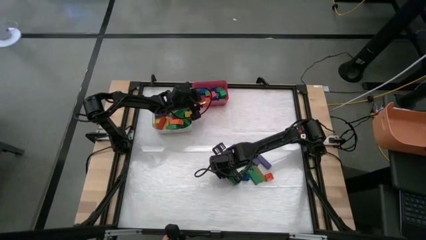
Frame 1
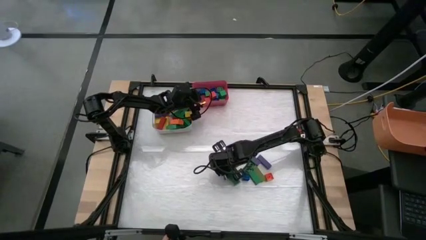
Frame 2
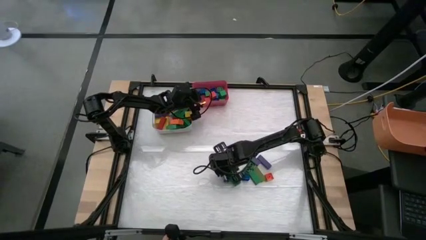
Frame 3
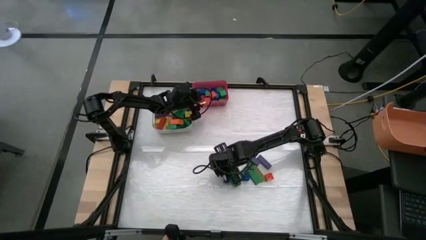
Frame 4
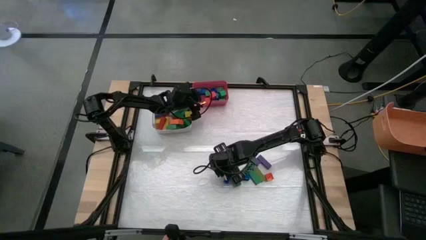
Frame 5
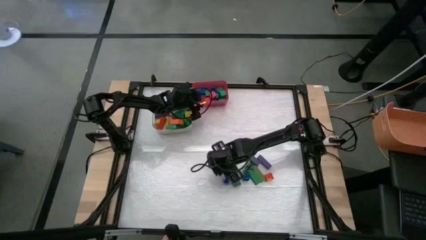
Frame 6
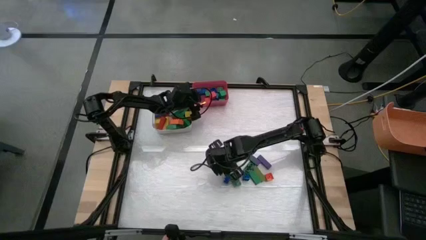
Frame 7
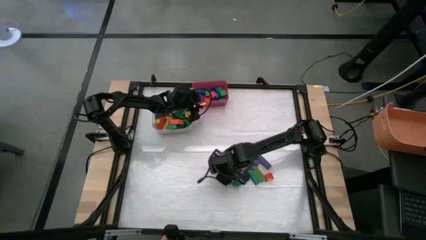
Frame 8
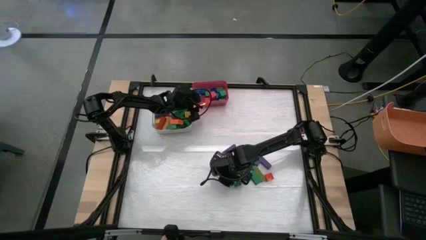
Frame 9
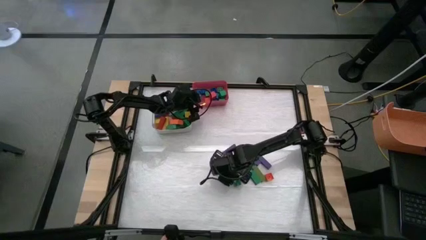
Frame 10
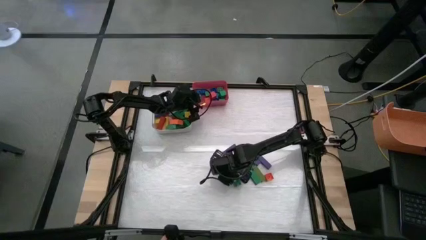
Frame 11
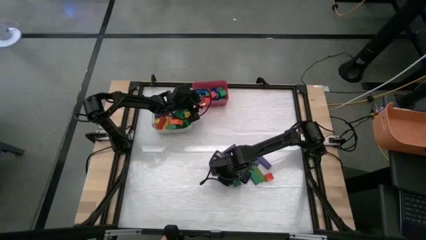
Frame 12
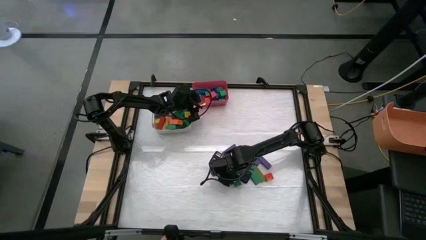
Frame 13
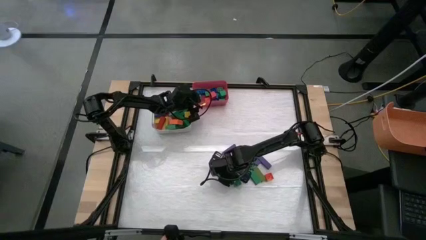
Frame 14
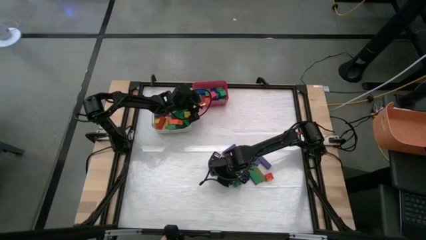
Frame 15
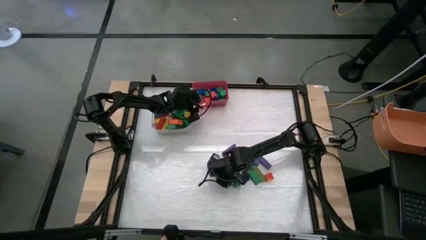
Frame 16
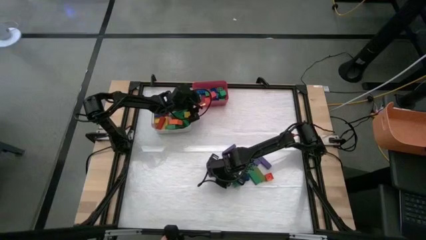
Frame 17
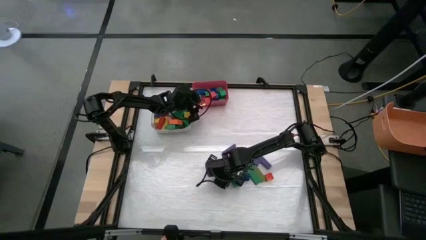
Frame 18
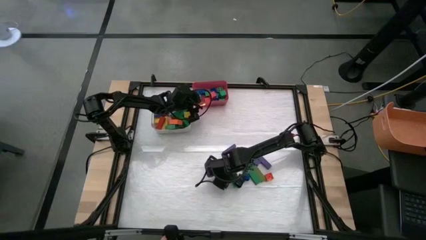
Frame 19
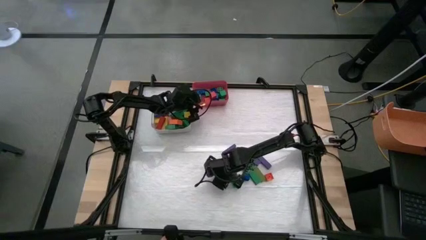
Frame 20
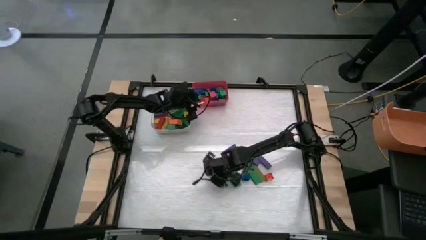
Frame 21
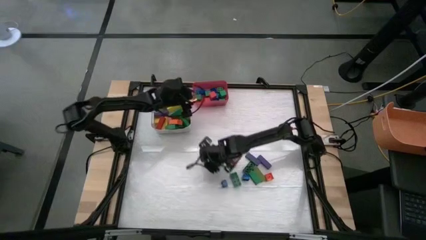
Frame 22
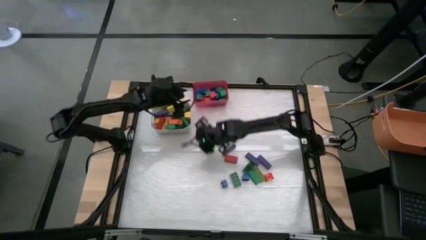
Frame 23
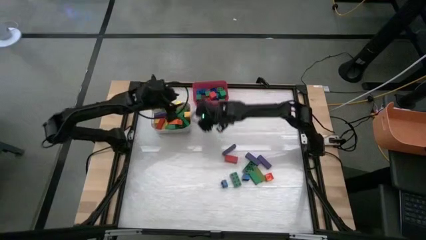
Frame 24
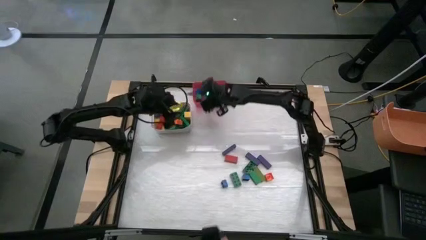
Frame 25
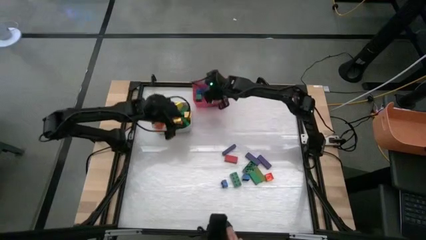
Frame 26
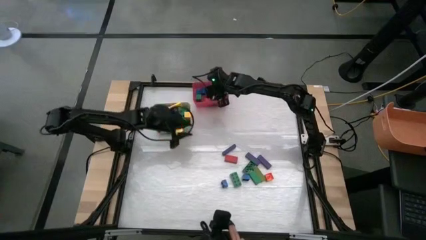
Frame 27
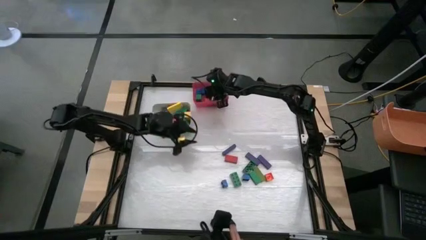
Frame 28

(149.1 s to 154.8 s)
Task: Sort blocks by size
Put the small green game piece into the red bin

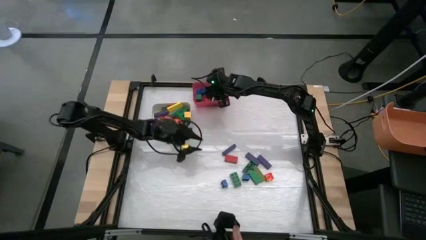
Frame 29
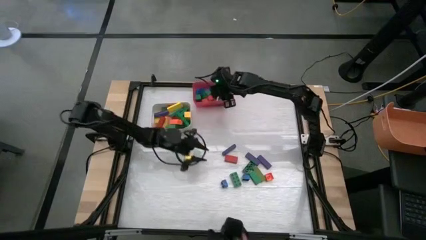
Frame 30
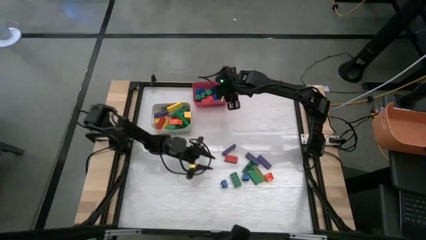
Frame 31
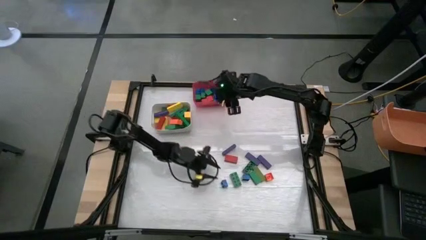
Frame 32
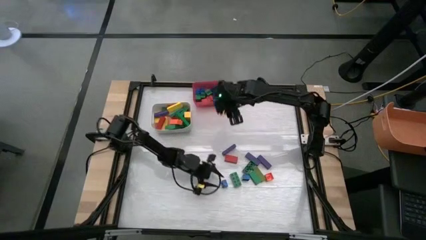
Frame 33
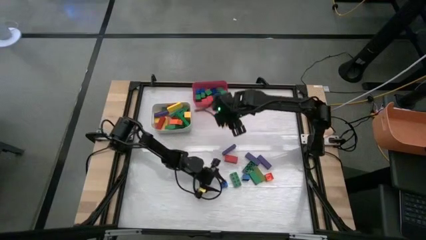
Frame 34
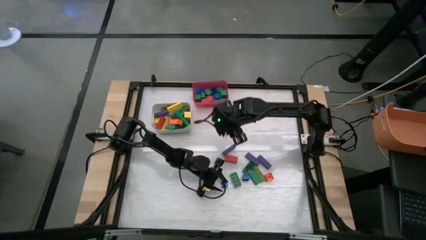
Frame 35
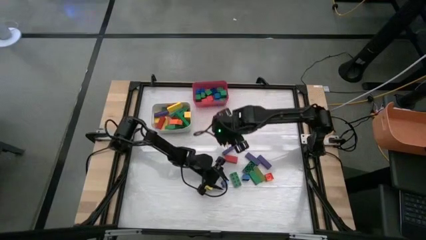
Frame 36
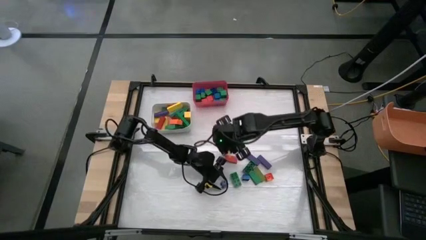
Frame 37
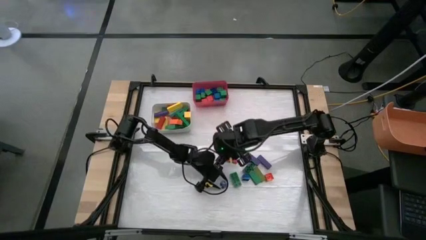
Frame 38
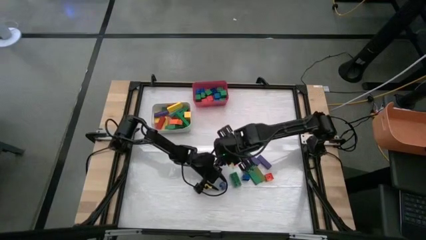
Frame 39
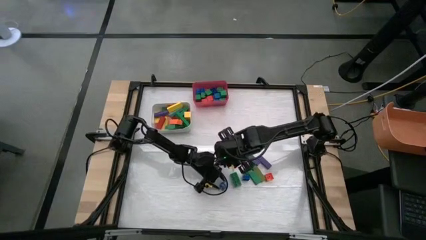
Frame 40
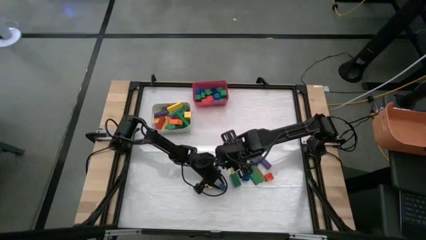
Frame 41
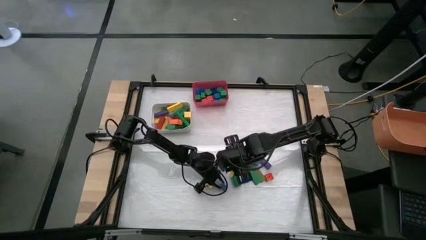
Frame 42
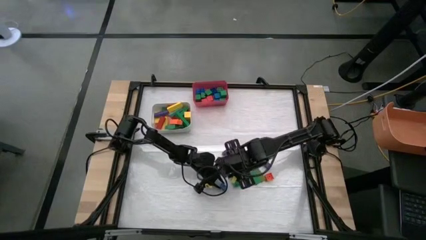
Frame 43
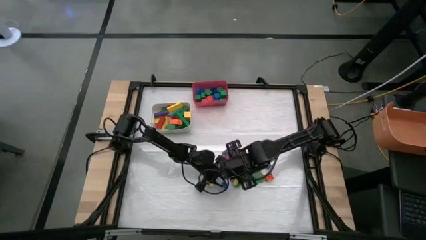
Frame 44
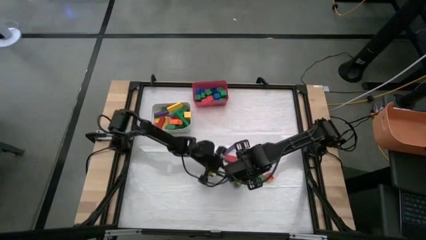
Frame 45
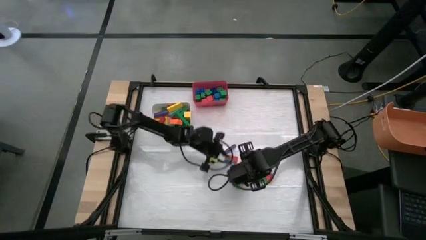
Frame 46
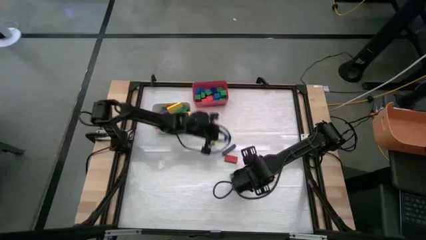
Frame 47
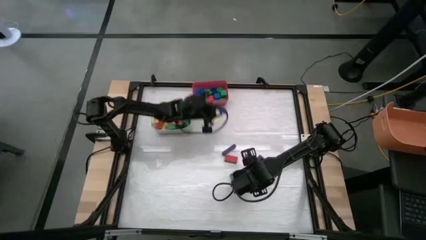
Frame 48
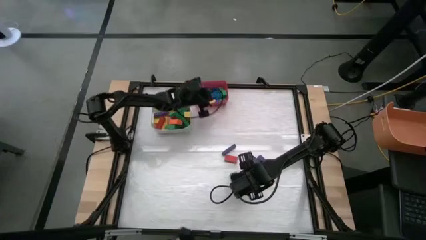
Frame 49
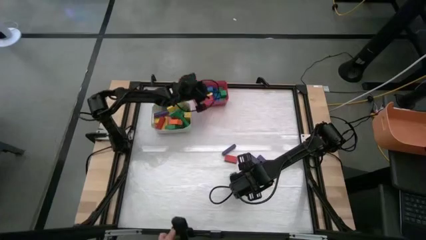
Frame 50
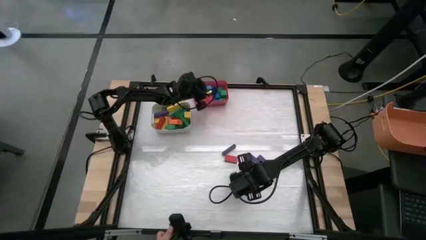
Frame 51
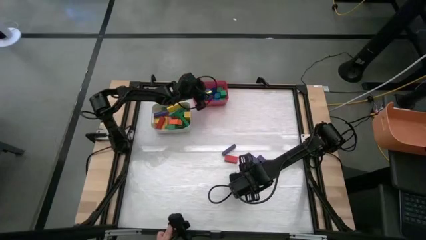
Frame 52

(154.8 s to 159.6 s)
Put the small blue game piece into the red bin

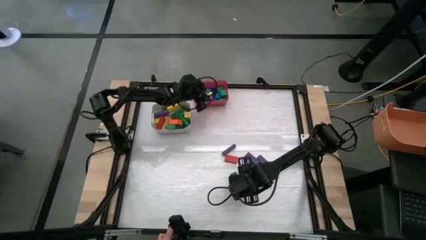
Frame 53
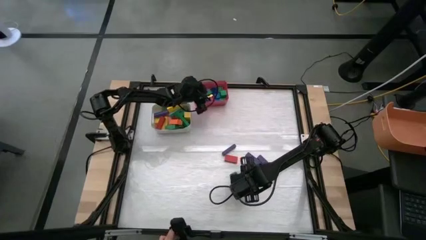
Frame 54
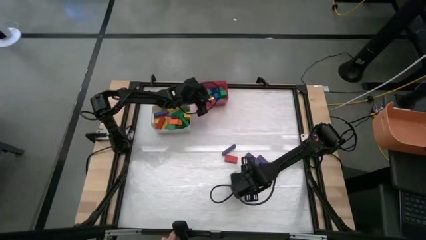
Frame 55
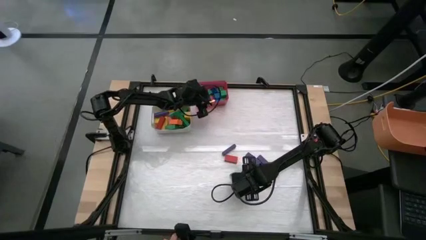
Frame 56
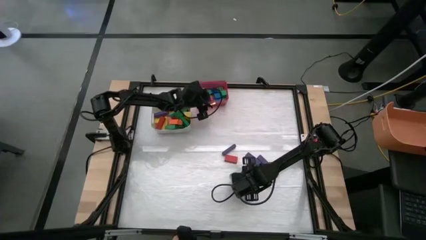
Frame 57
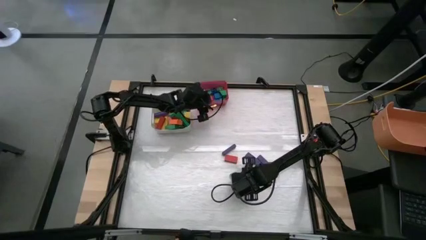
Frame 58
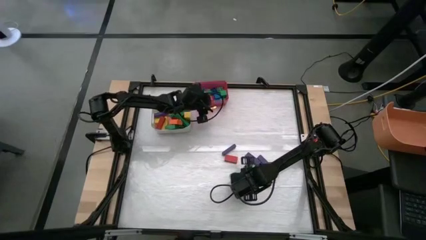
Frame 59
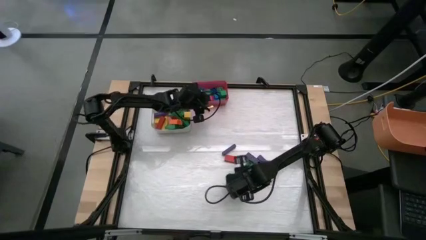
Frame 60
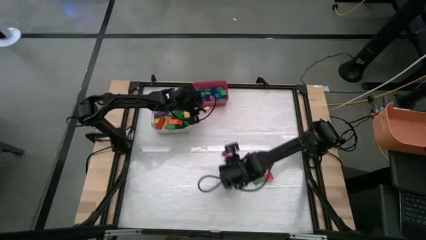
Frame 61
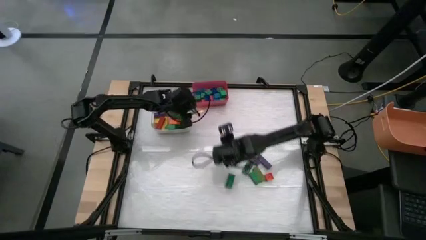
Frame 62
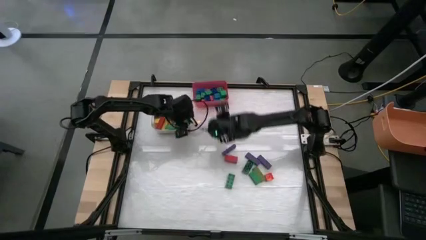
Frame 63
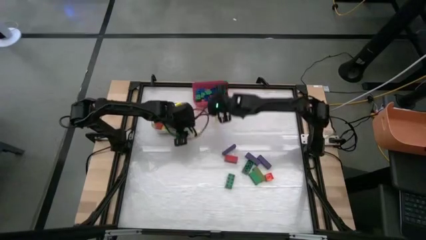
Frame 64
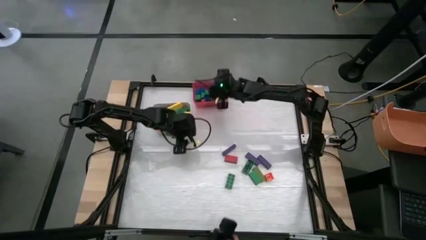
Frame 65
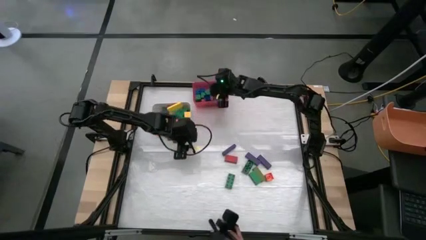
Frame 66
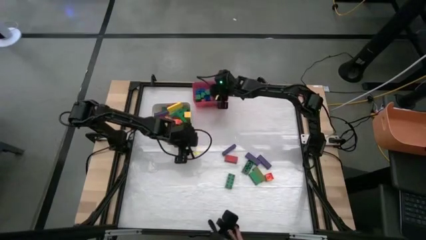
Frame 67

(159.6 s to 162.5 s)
Put the small blue game piece into the red bin

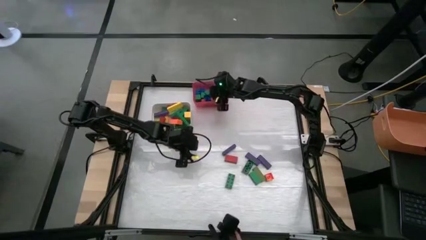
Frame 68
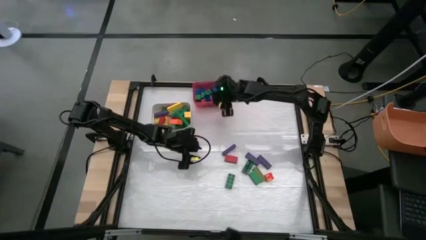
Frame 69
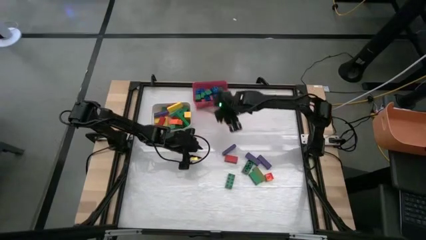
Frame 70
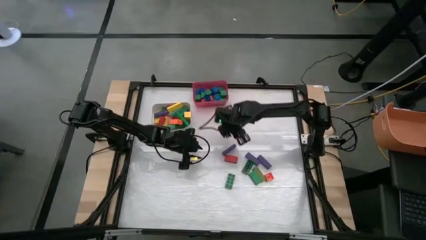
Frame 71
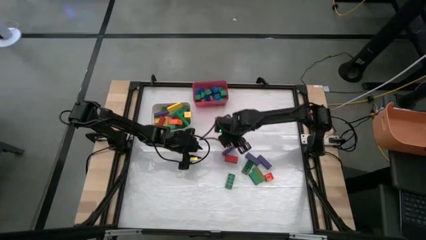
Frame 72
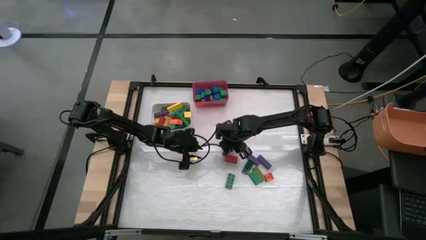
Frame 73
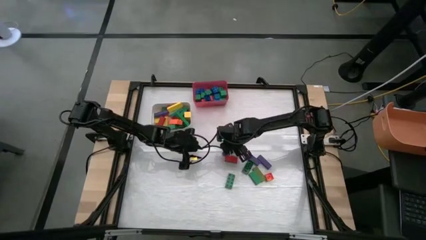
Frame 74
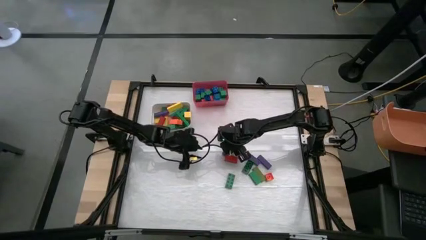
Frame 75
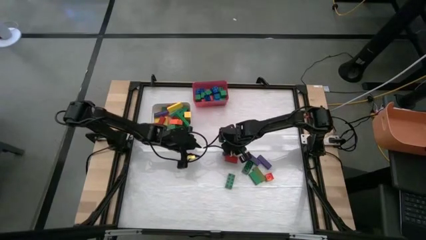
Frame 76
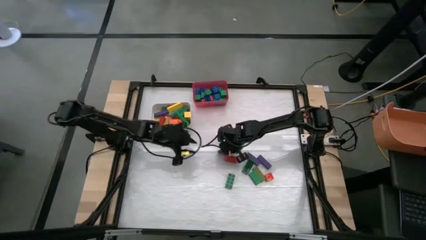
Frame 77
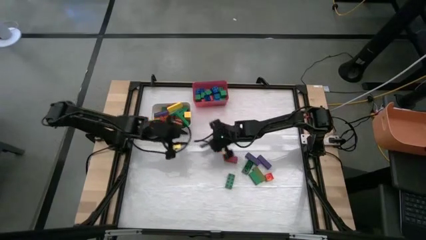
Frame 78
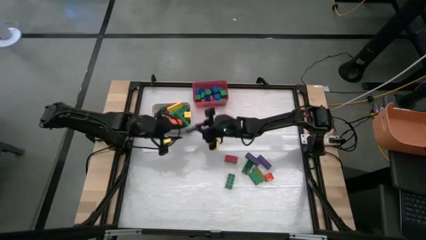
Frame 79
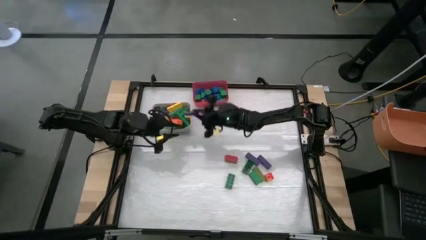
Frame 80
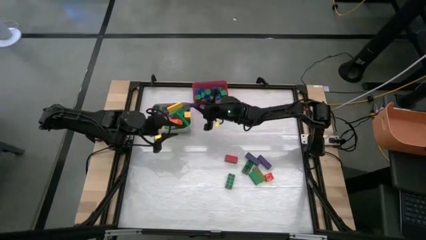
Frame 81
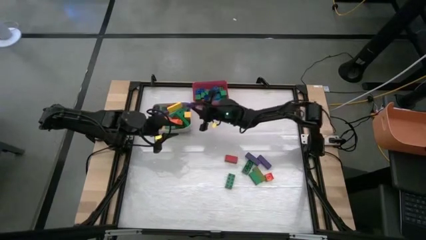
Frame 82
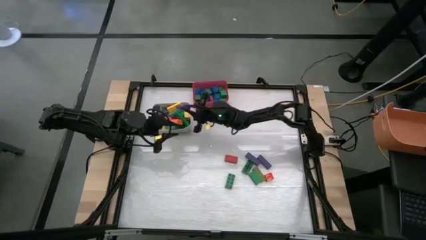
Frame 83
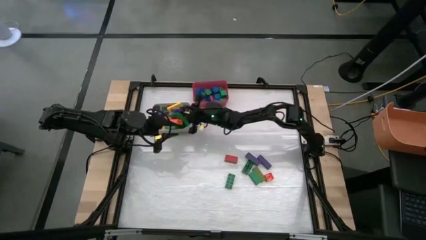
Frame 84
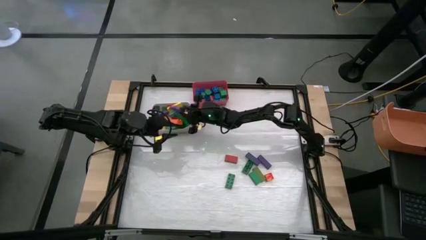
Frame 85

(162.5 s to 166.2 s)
Put the large violet wooden block into the white bin
